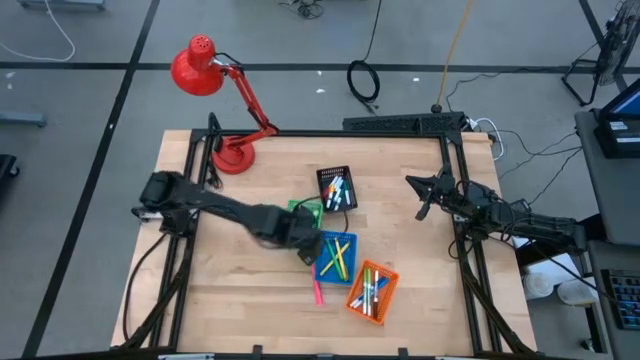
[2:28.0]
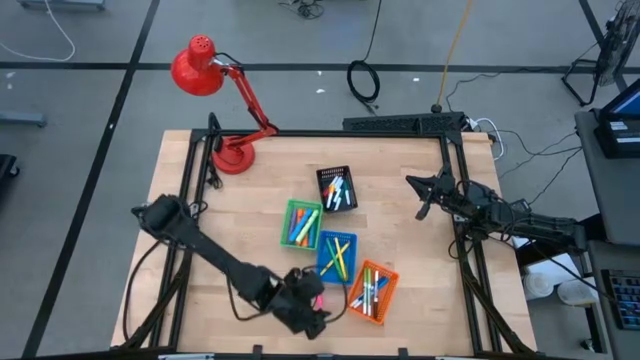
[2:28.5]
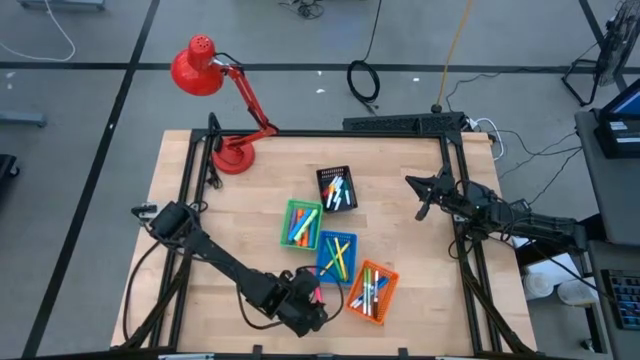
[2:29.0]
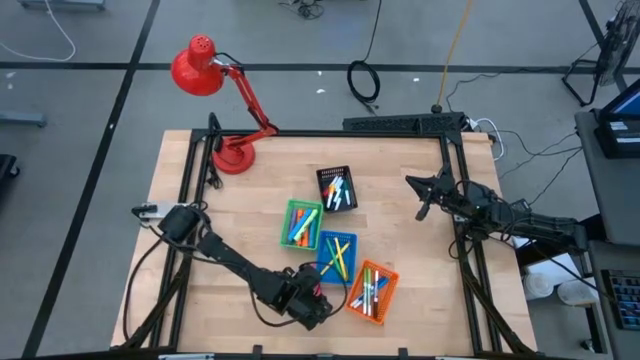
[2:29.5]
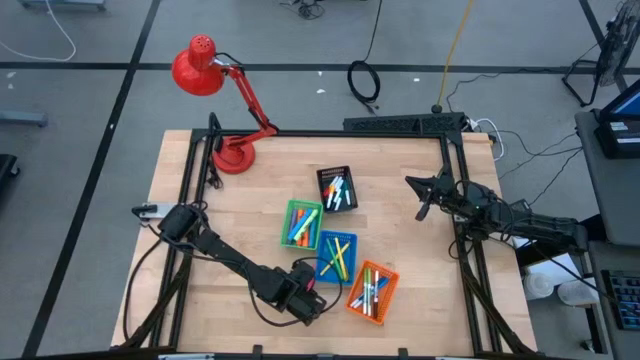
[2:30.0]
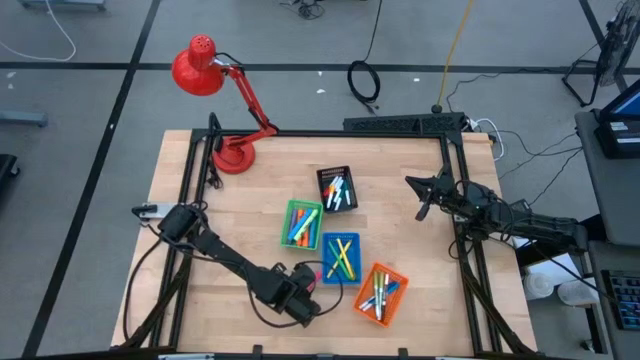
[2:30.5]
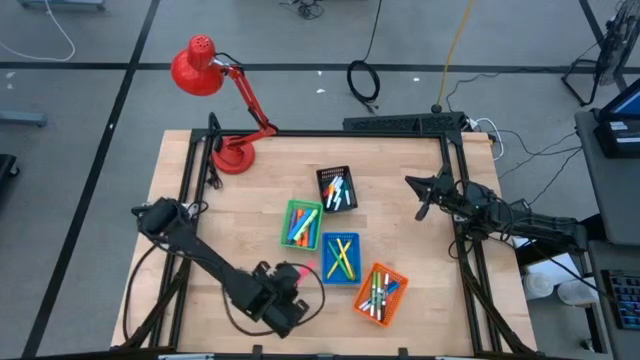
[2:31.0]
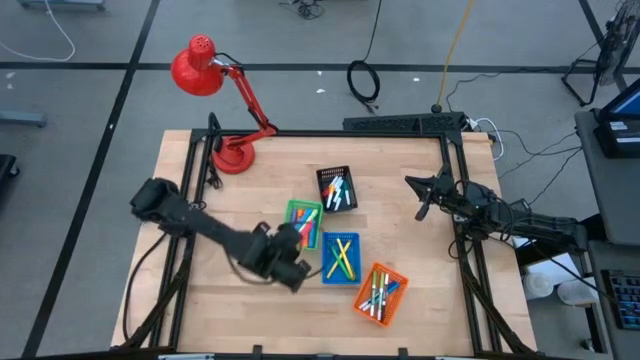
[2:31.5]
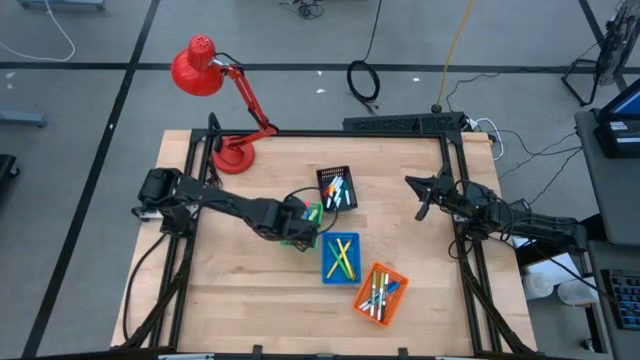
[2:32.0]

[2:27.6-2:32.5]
Task: Pick & Place Markers
Put the pink highlighter into the green basket

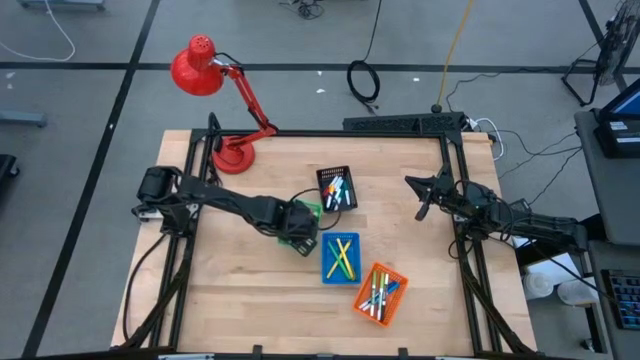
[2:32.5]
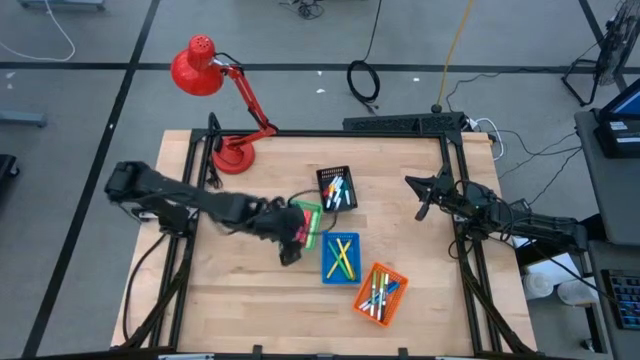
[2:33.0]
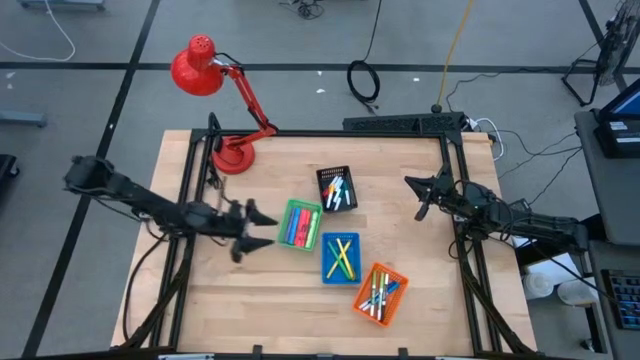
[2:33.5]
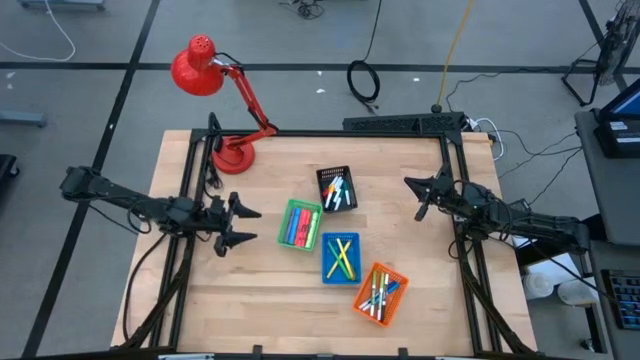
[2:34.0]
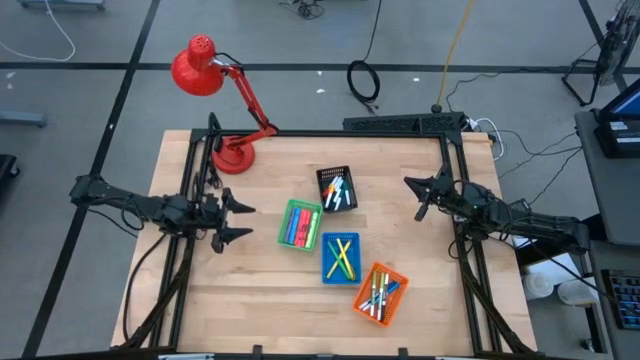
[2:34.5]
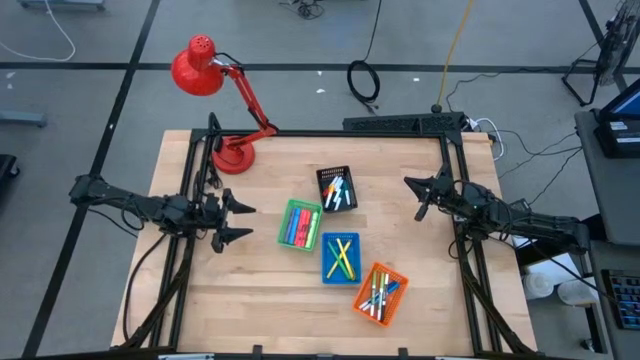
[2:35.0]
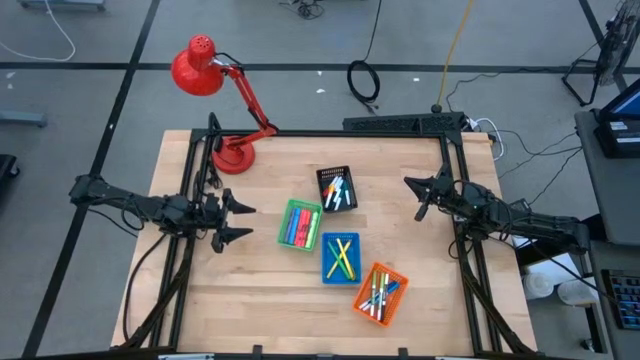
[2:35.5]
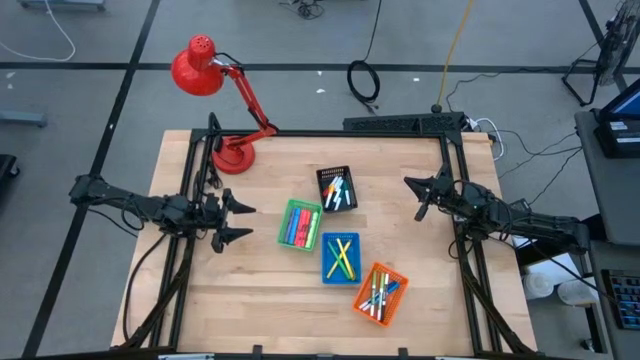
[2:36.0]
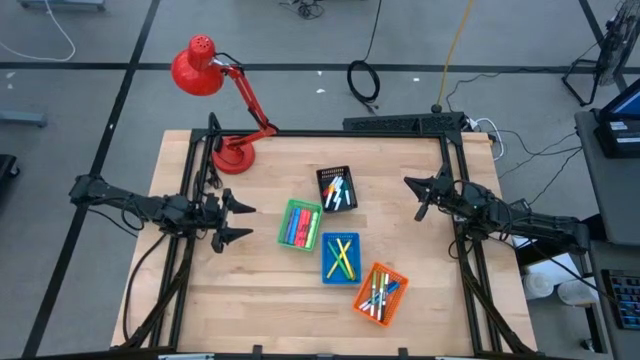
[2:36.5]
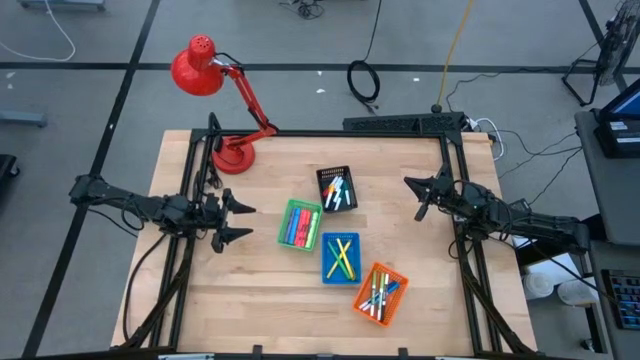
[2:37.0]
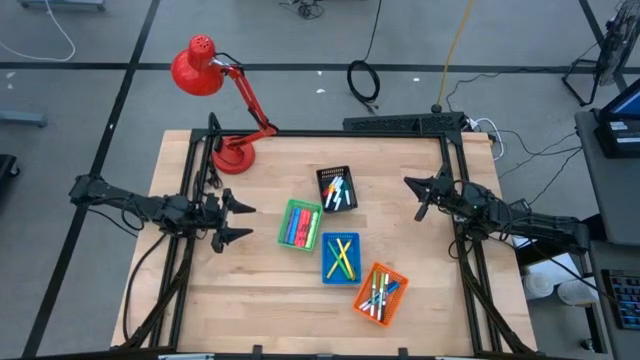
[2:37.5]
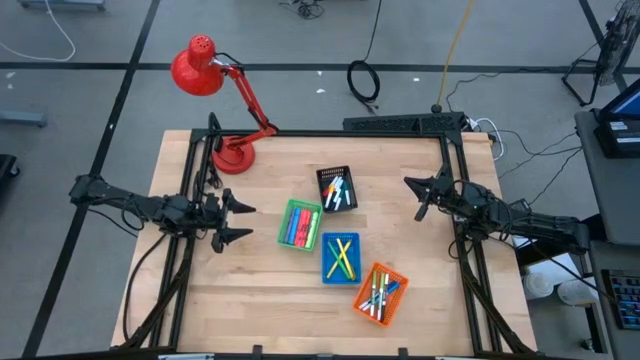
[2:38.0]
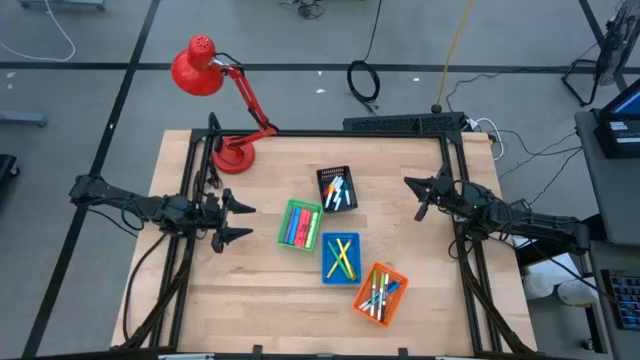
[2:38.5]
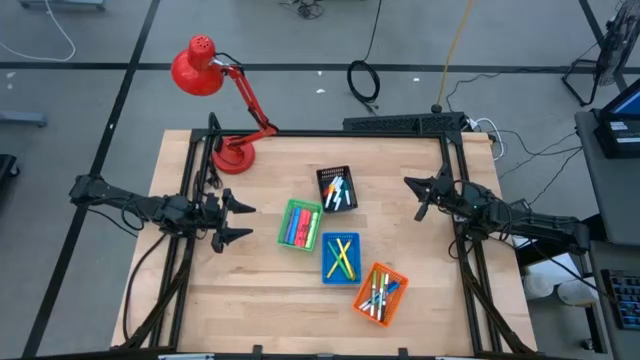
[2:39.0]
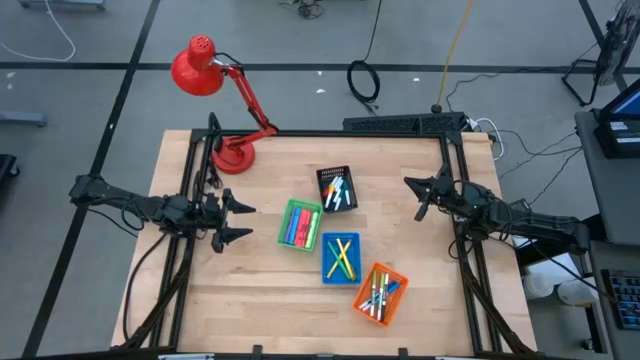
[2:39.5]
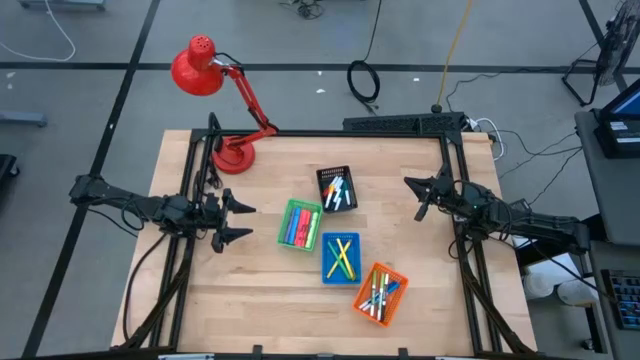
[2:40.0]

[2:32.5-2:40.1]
Return to Home Position

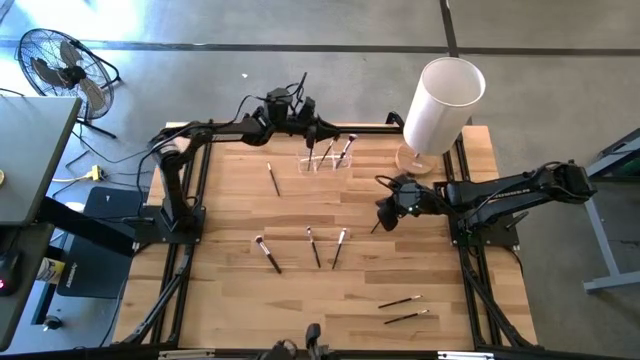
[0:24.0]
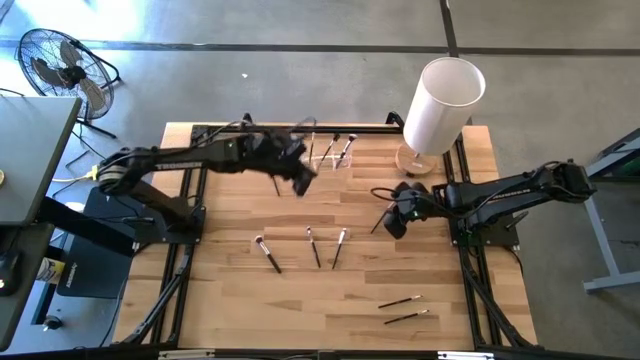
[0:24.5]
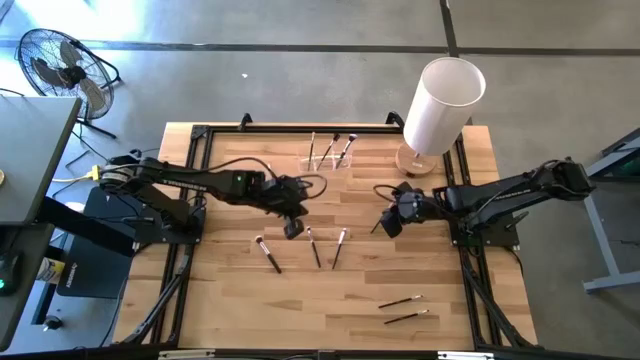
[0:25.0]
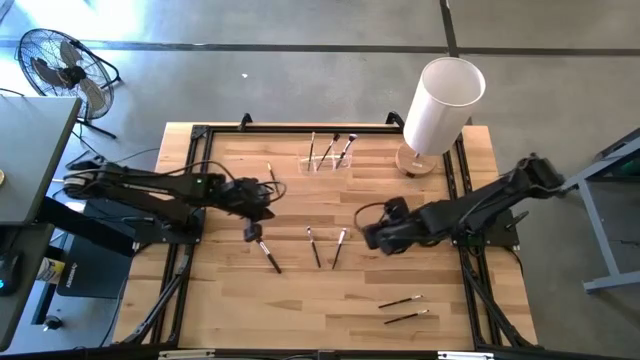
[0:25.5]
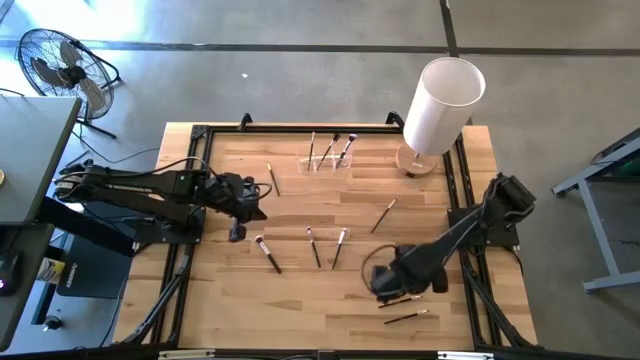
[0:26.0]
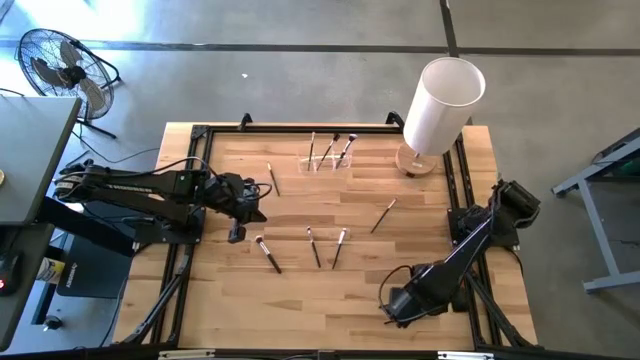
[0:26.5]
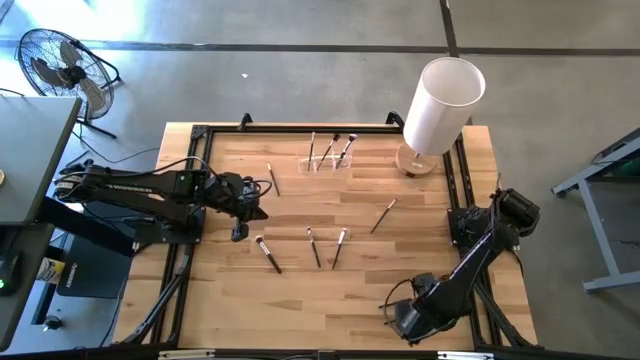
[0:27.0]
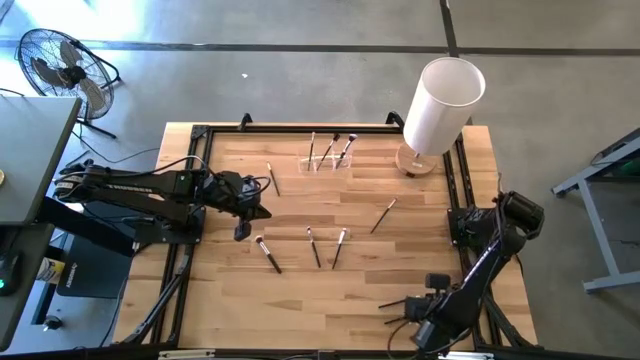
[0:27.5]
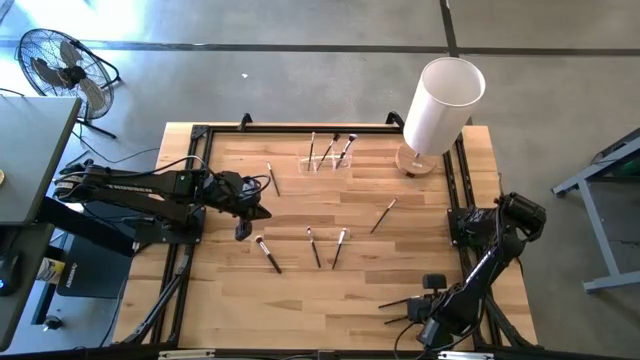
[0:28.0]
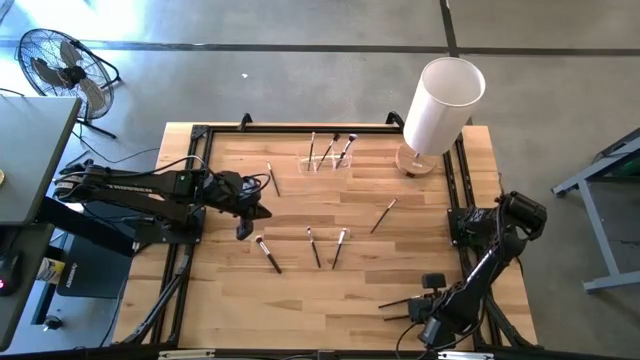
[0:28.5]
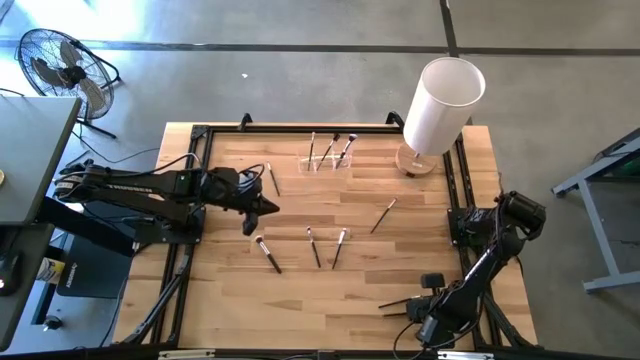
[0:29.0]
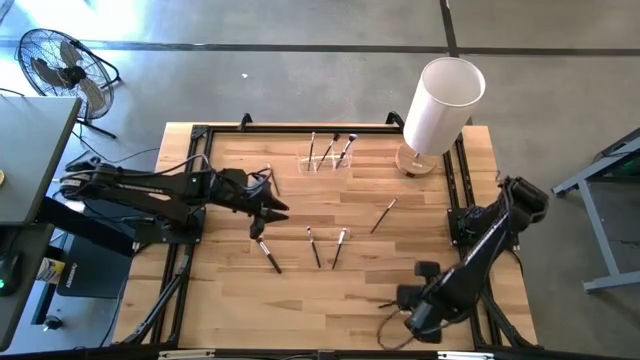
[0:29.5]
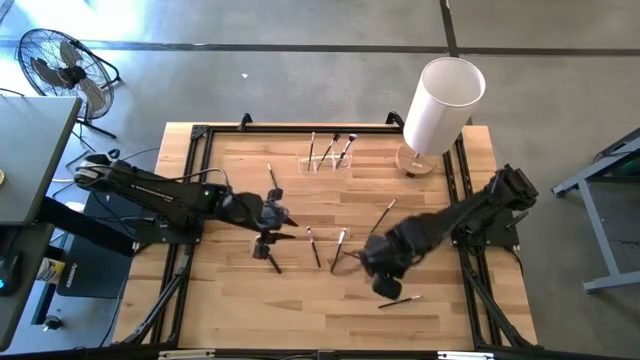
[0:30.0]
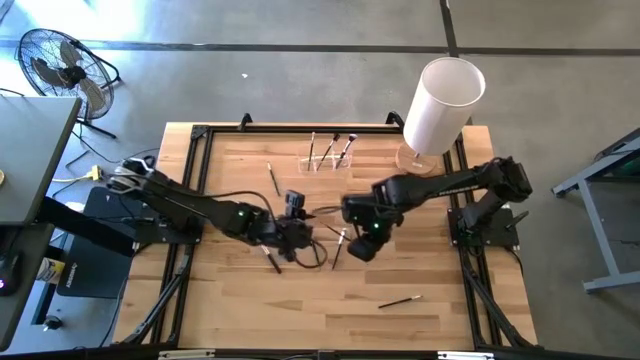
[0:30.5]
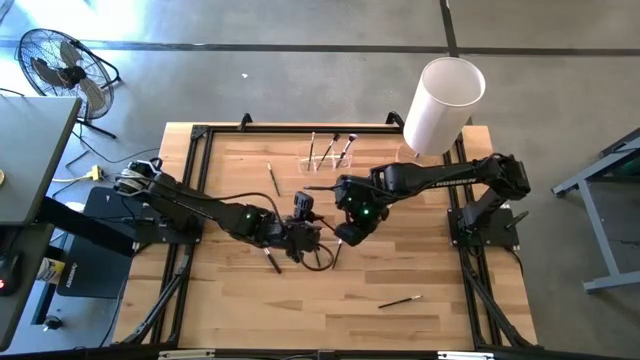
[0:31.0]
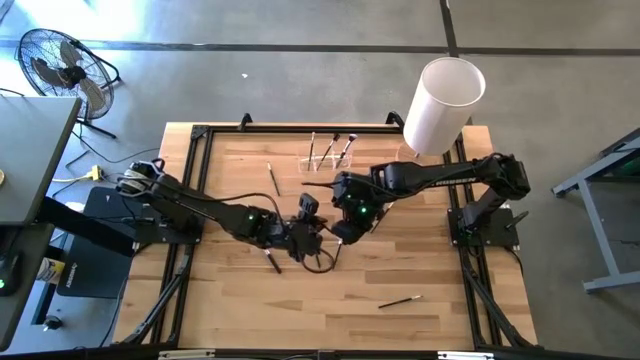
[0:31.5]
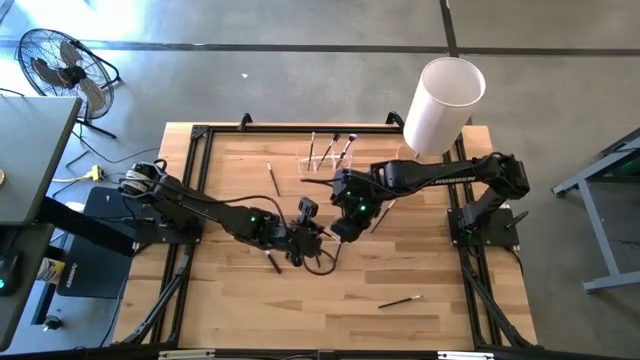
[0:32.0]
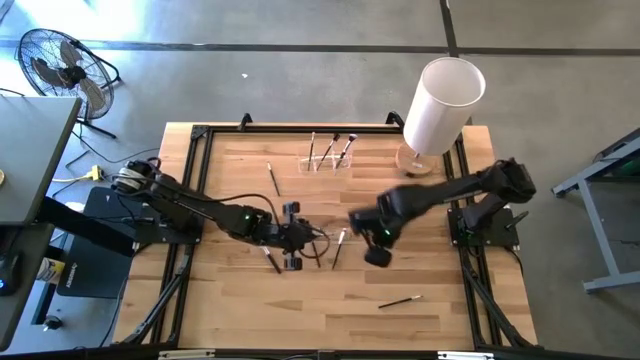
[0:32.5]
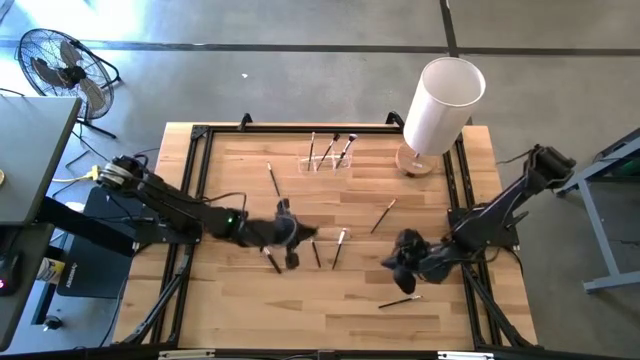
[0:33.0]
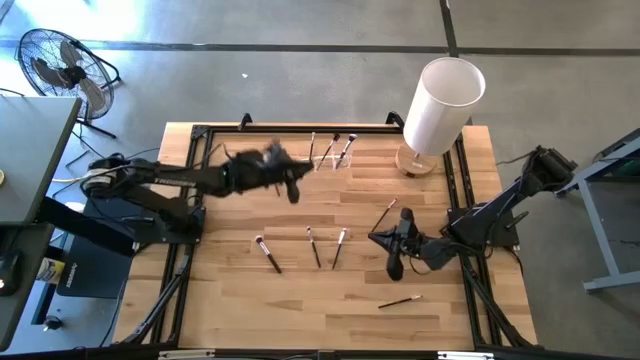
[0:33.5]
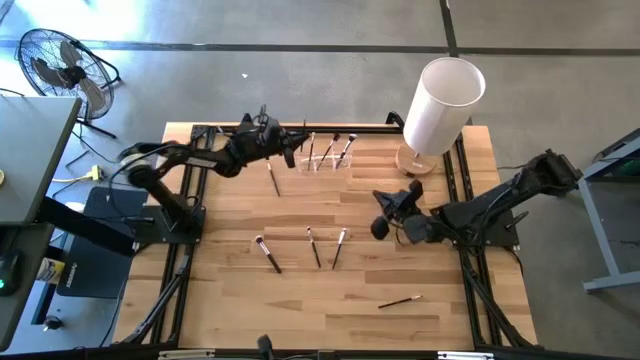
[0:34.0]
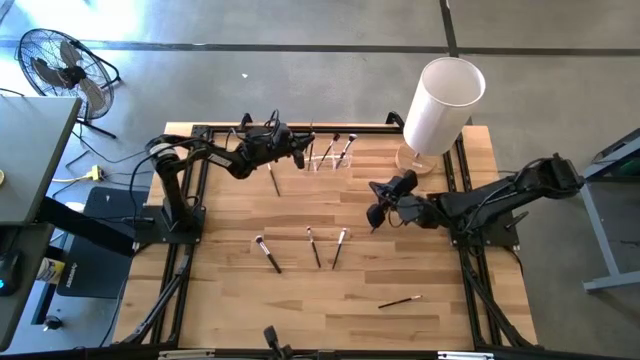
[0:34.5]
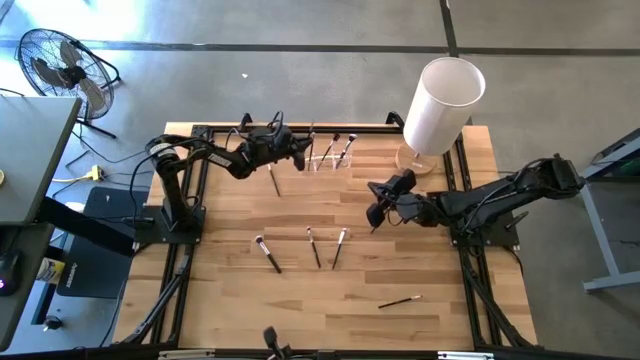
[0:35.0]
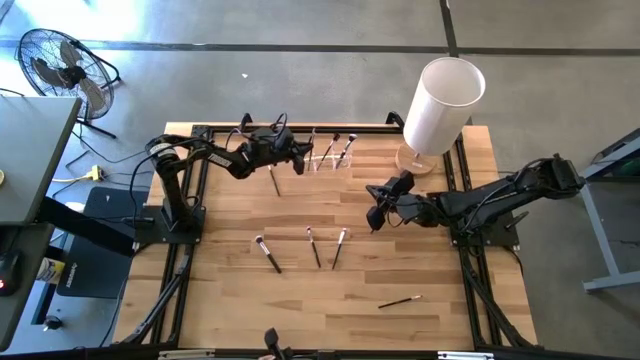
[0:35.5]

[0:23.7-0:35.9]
Task: Pick & Place Makeup Brushes
Put the black eyeshadow brush into the transparent organizer
